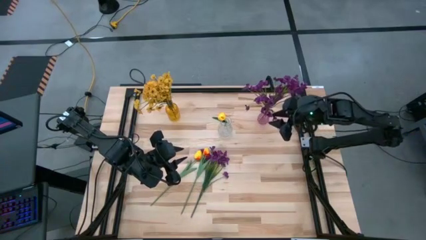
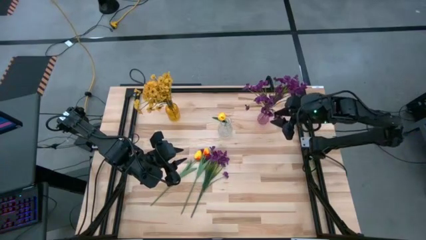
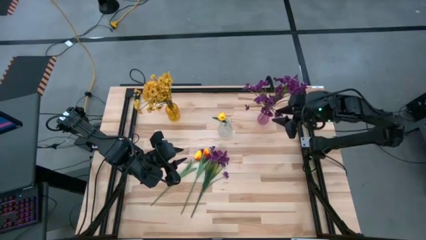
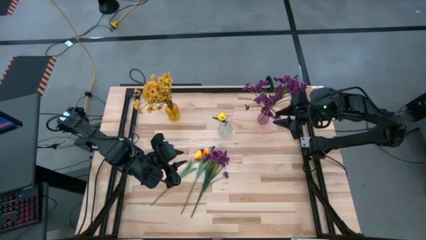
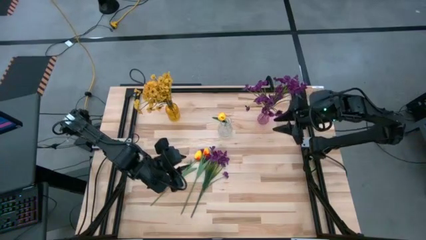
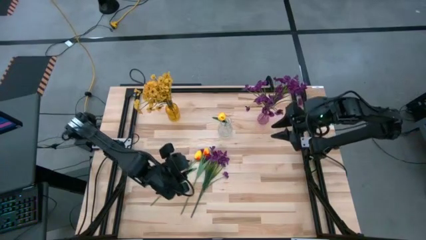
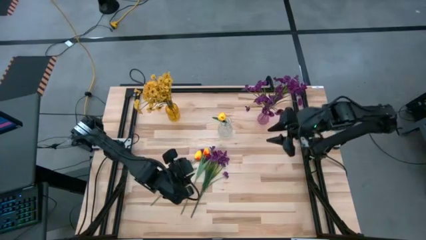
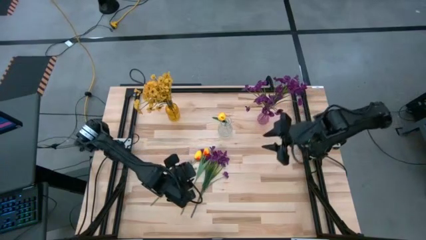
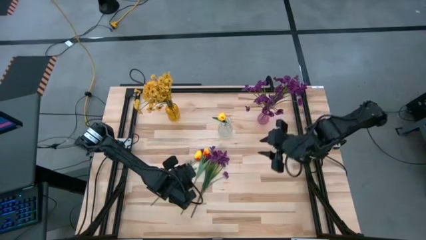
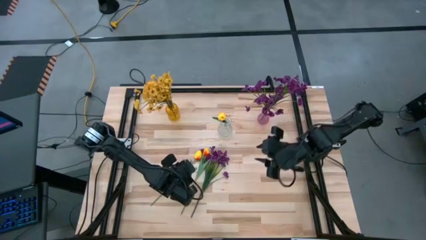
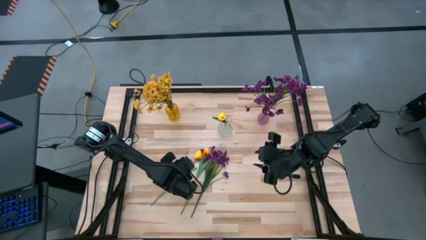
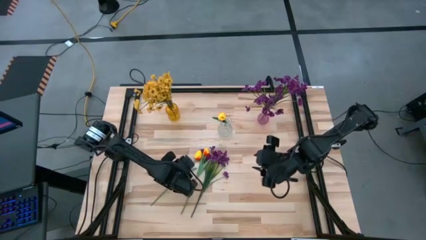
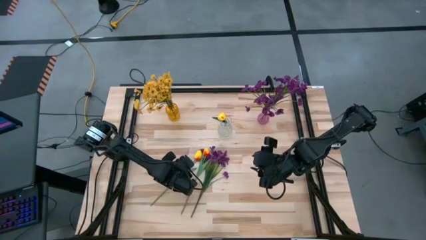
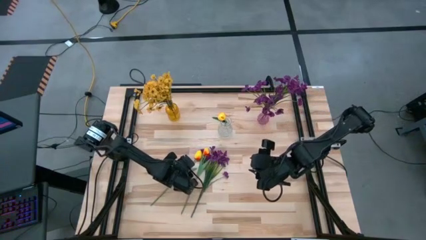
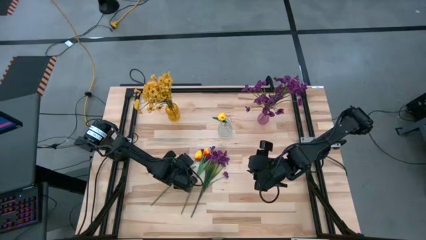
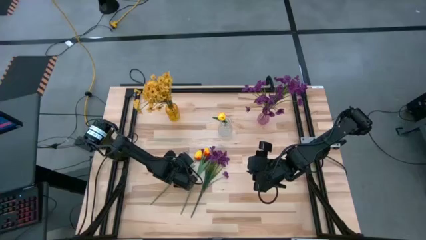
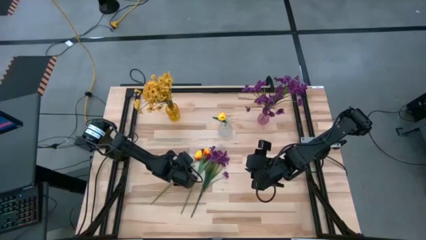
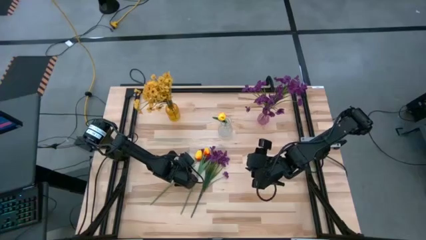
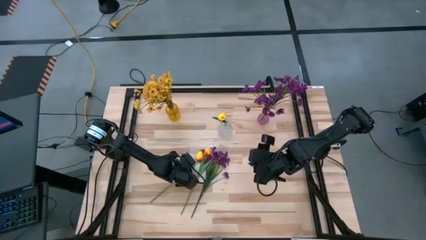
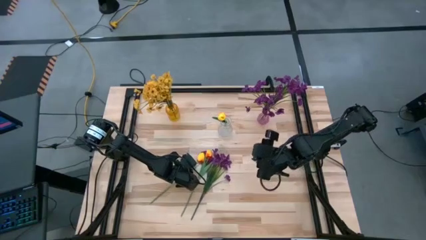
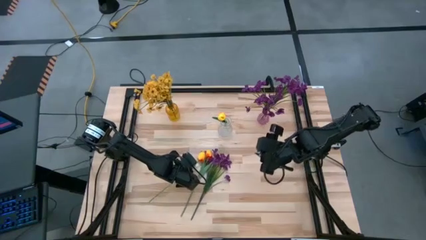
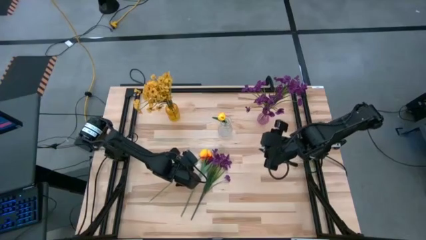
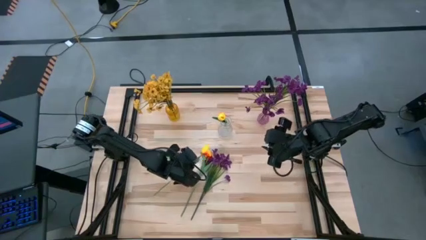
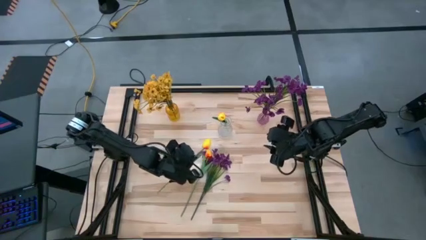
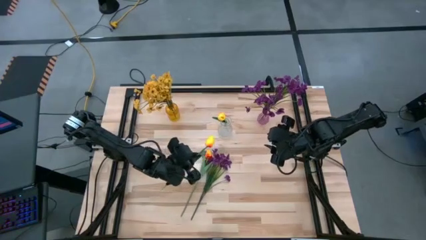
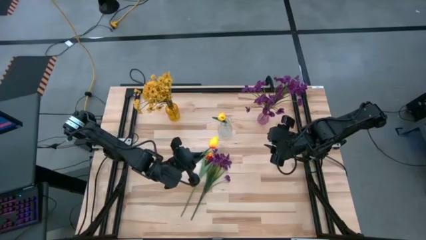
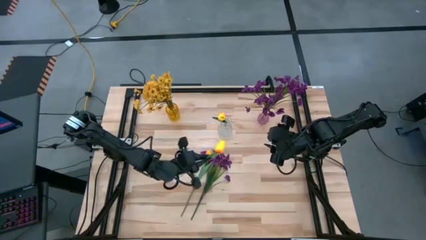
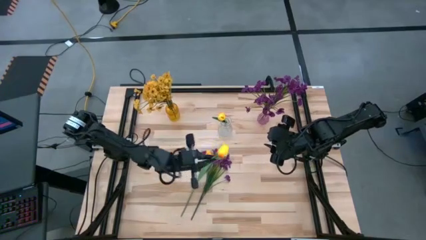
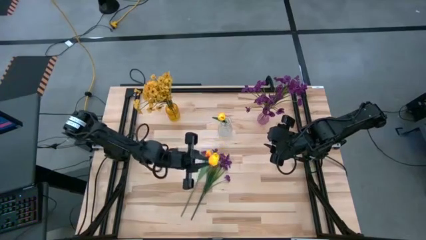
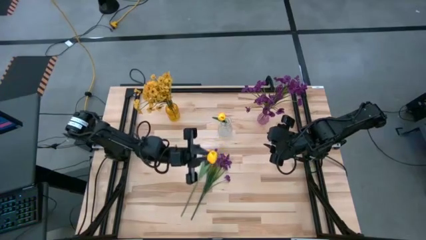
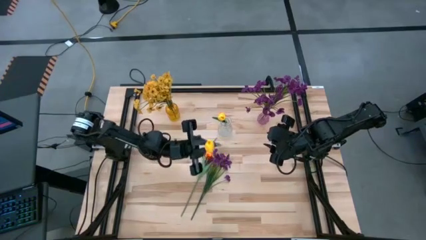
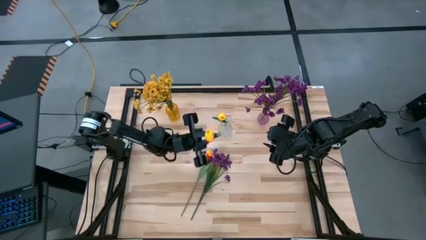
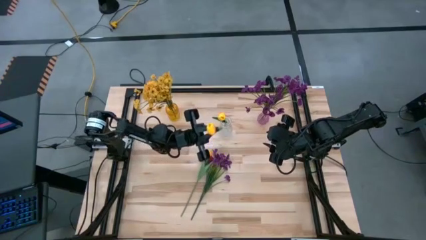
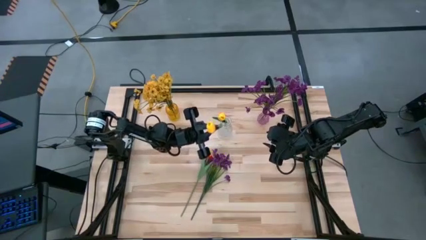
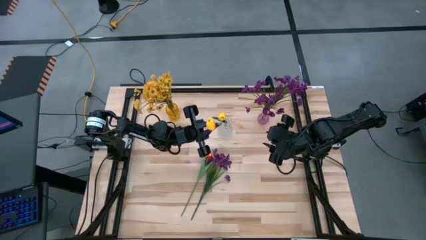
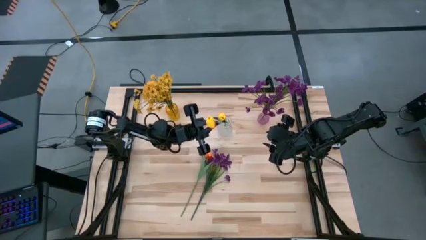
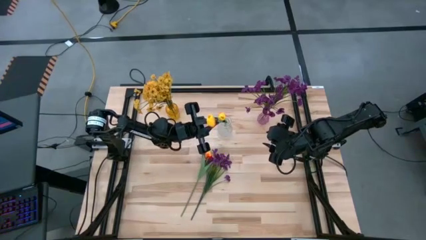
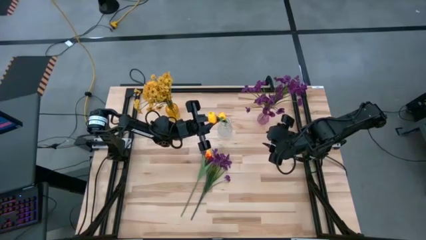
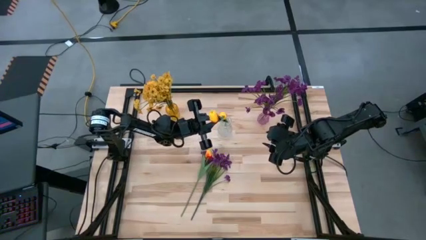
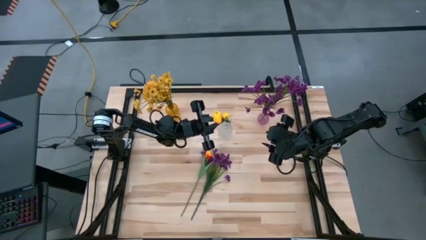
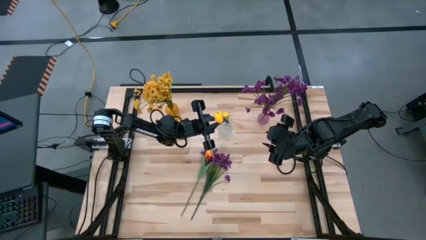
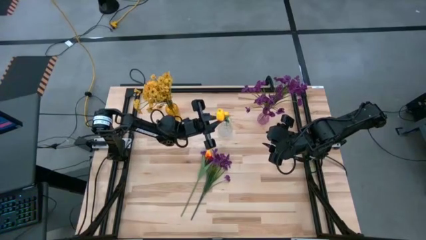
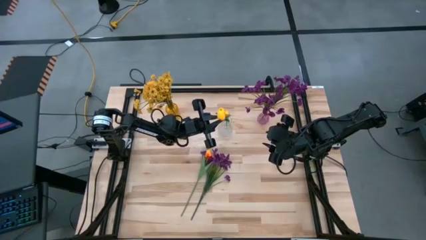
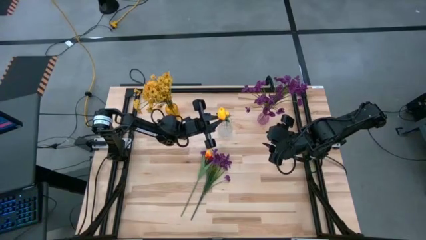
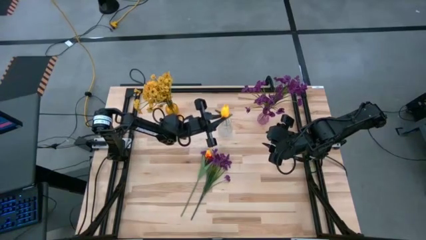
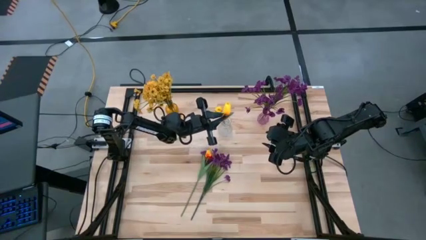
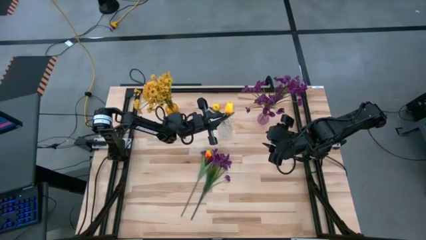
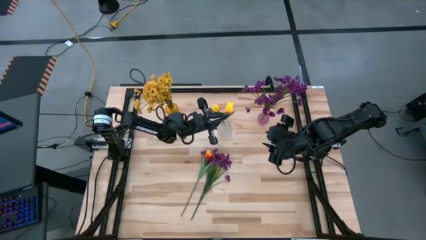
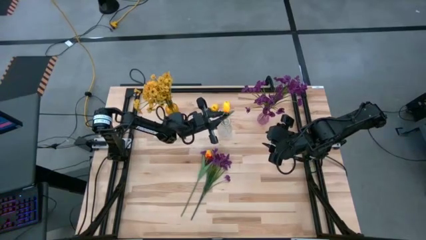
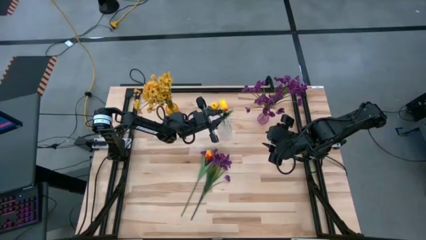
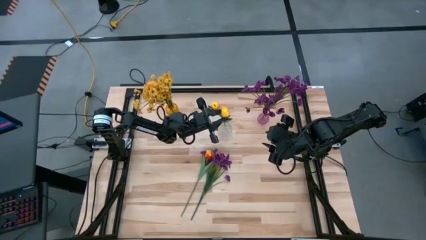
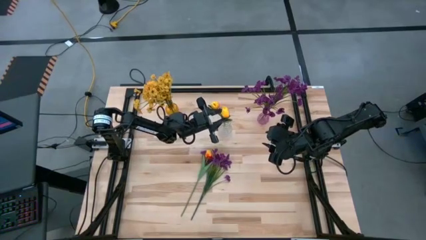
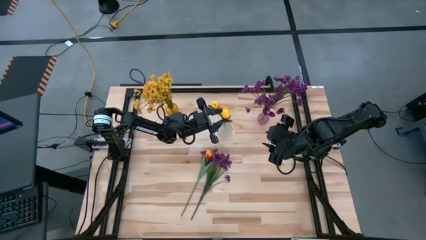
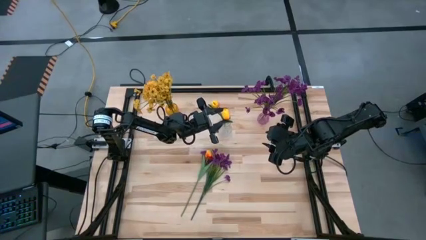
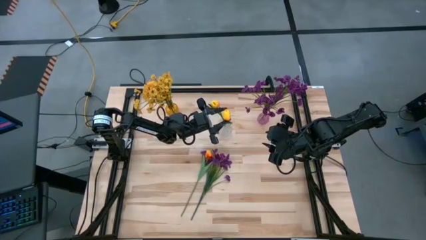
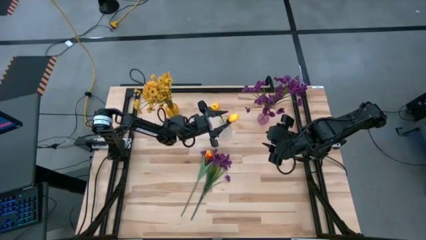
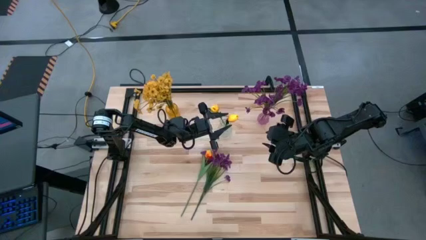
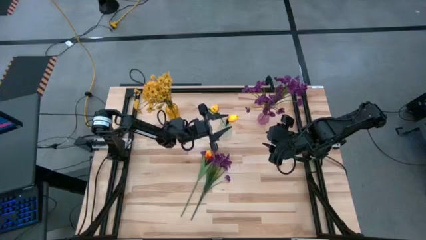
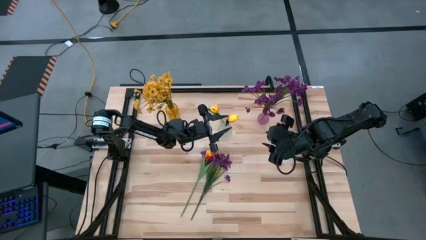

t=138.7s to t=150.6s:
Task: Sort flowers into vase by color
Put the yellow tulip into the transparent vase
